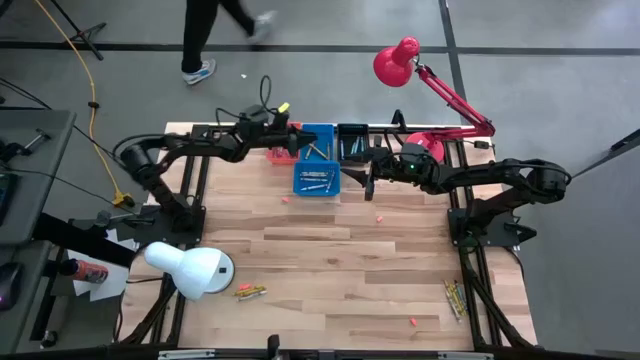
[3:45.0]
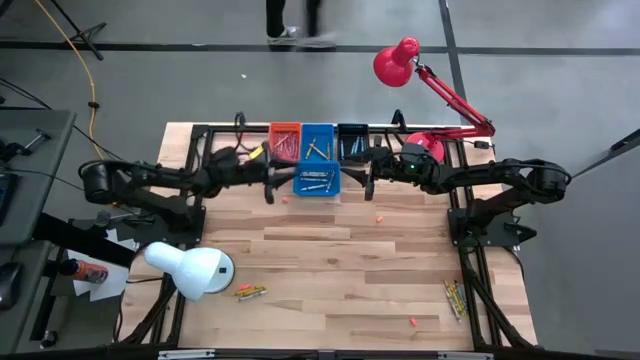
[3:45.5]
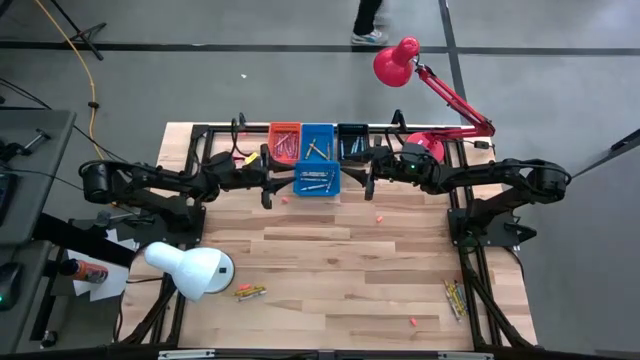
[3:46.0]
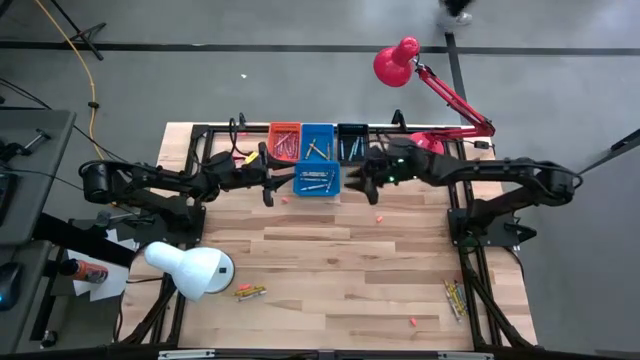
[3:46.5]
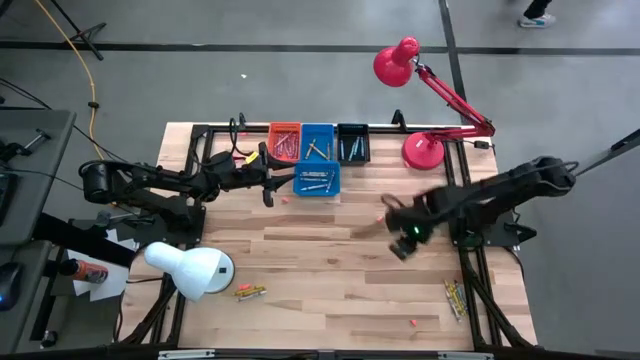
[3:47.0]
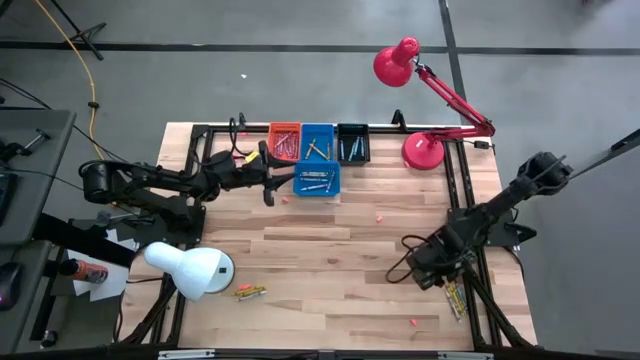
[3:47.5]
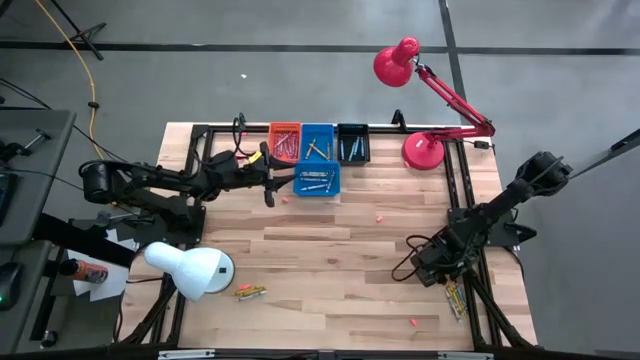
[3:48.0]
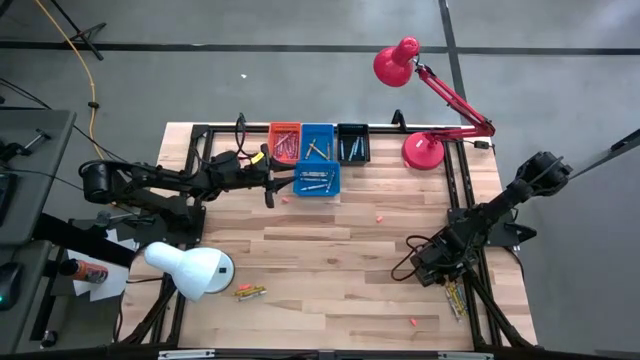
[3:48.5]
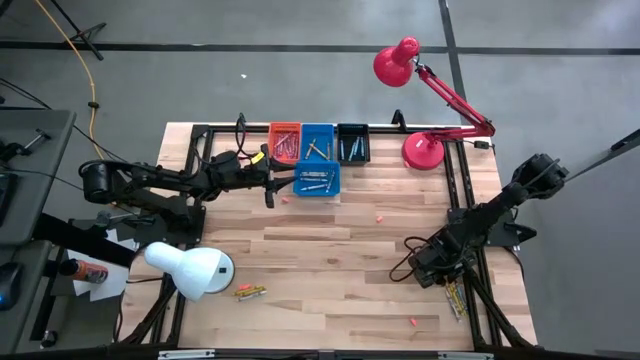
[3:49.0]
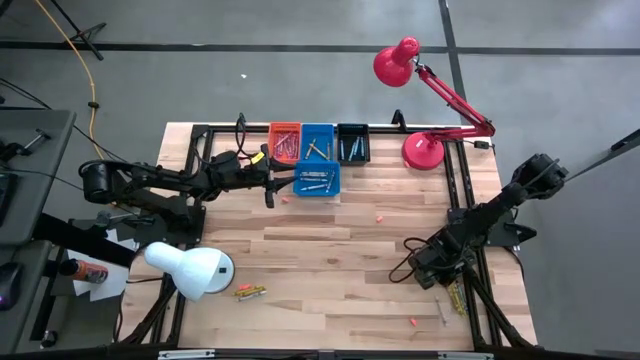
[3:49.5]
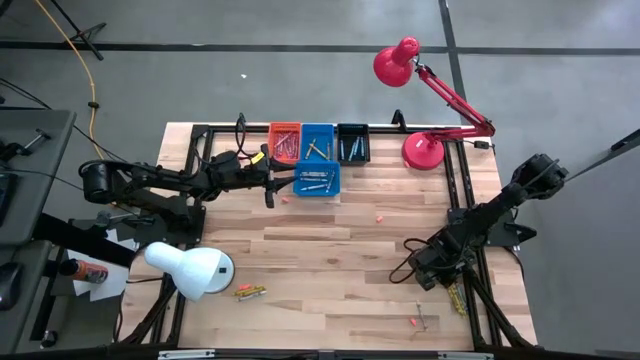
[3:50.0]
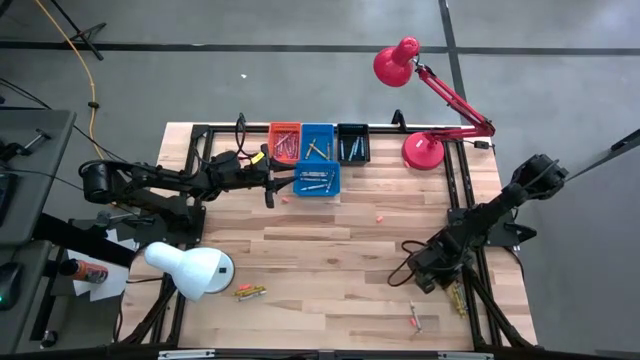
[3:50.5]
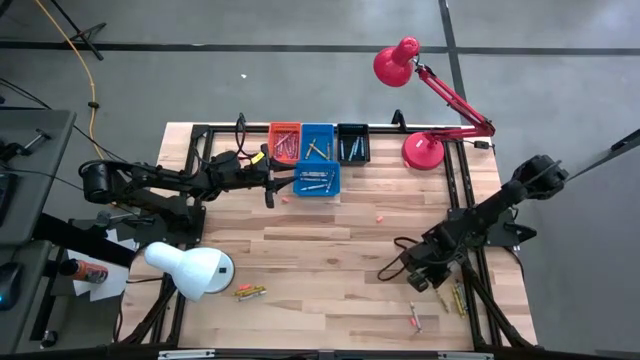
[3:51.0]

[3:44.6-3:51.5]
Task: Sort crayons
Put the yellow crayon into the top blue bin

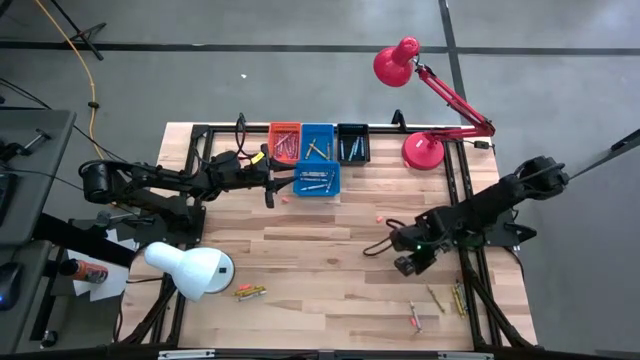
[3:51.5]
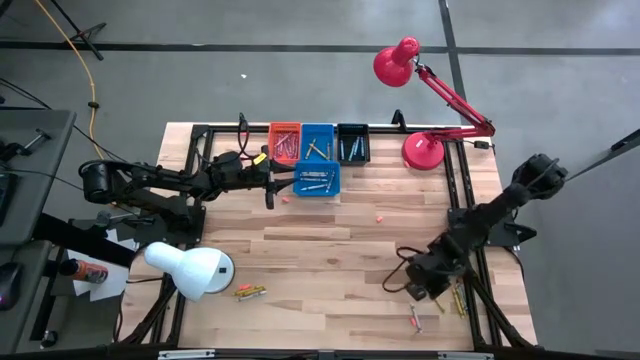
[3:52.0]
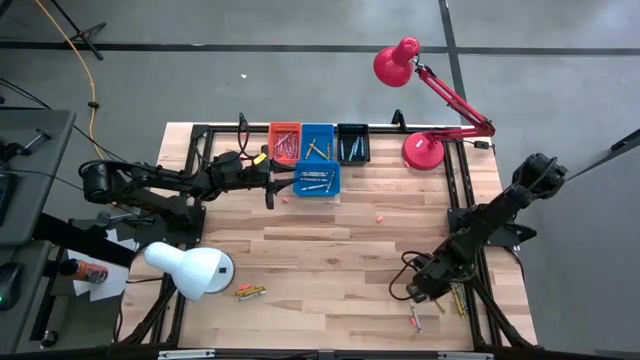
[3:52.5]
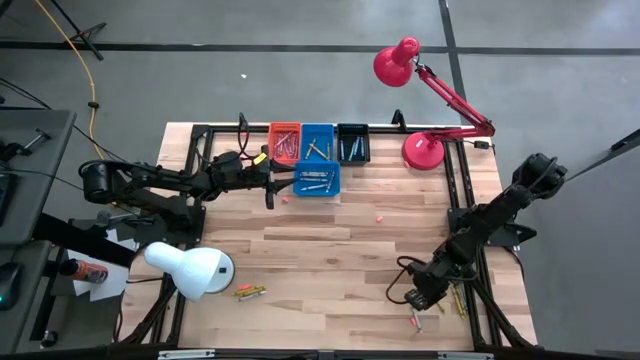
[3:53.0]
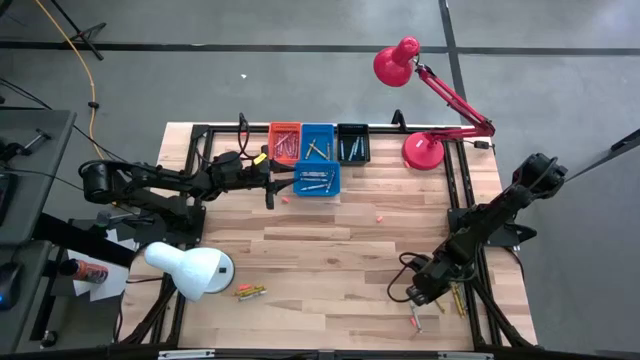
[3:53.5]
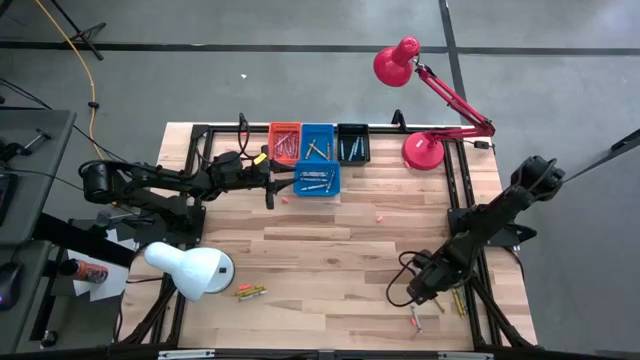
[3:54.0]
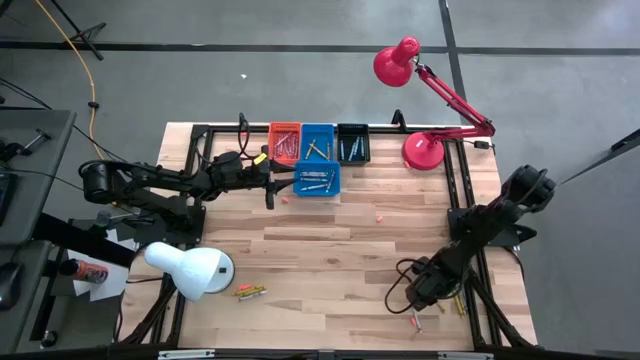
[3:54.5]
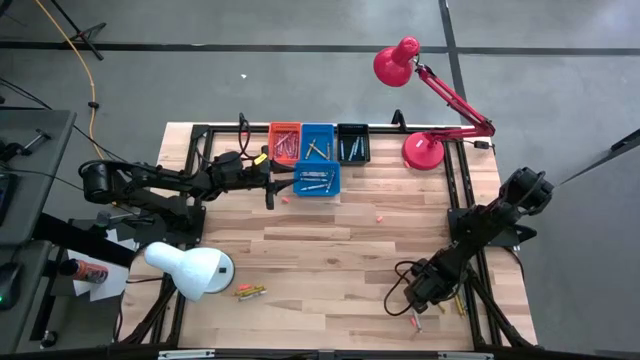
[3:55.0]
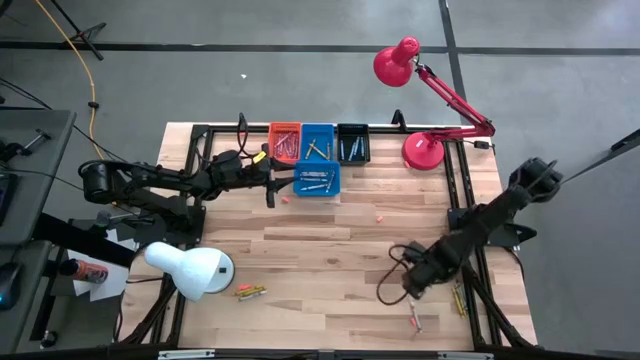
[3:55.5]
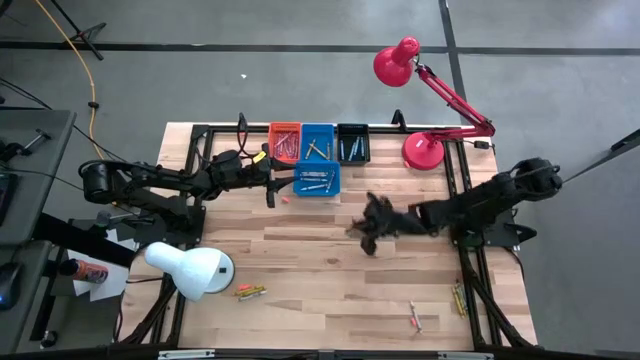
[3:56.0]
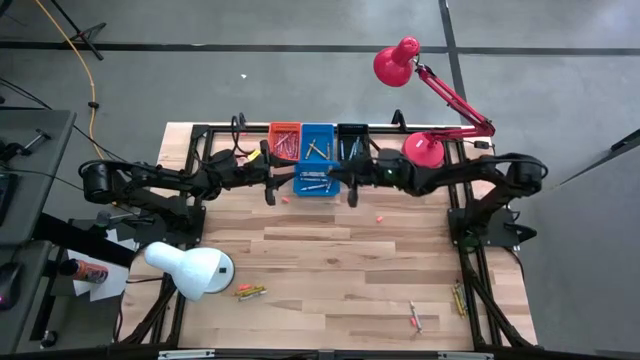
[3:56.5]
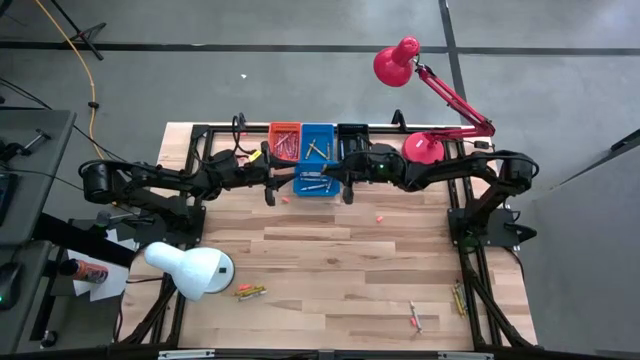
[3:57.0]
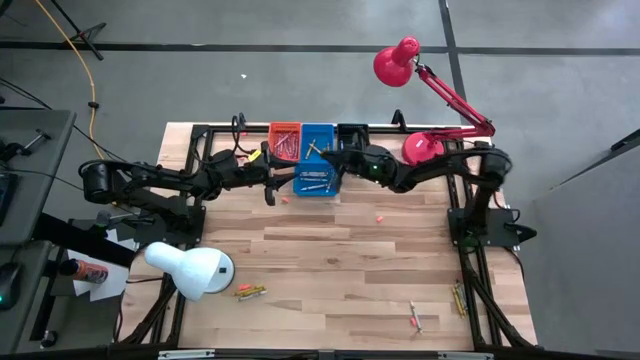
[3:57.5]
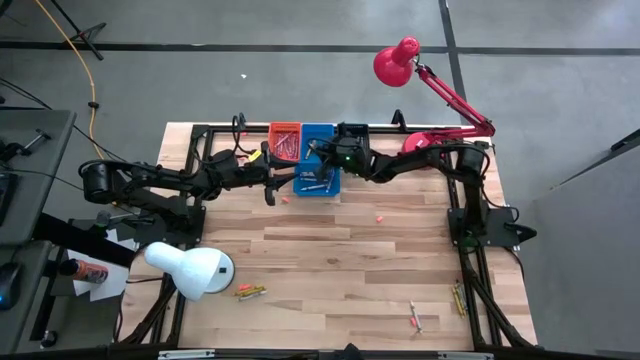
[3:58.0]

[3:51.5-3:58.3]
Put the yellow crayon into the top blue bin

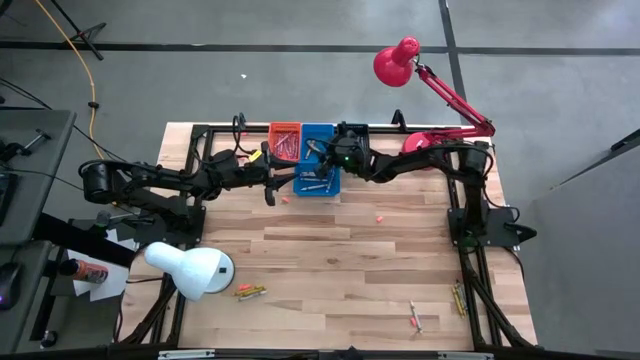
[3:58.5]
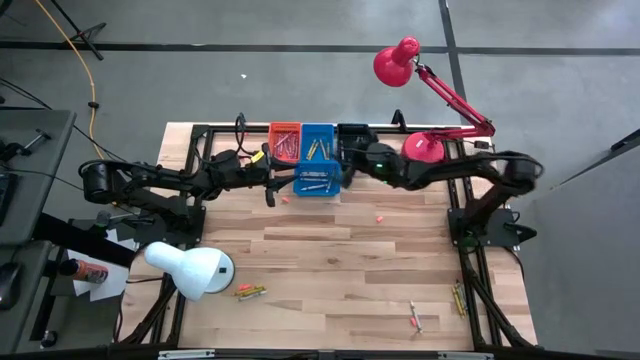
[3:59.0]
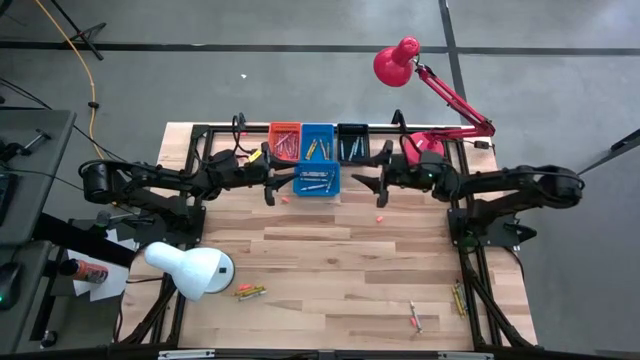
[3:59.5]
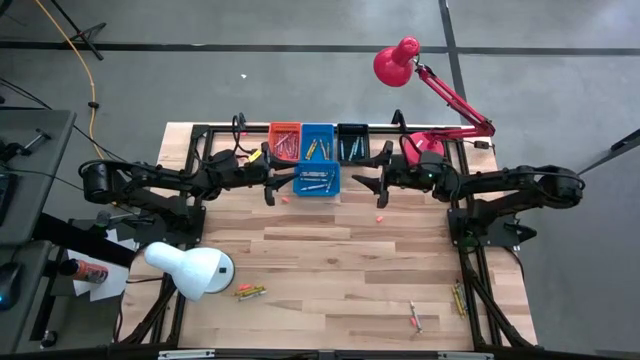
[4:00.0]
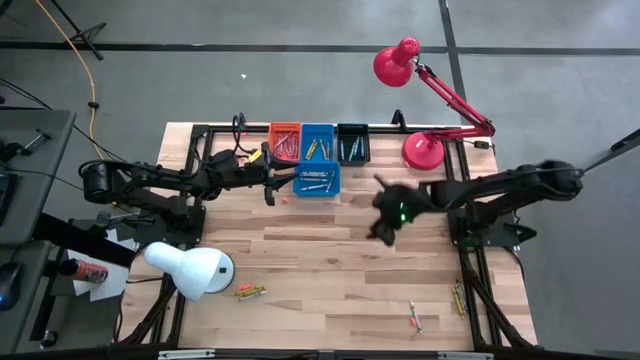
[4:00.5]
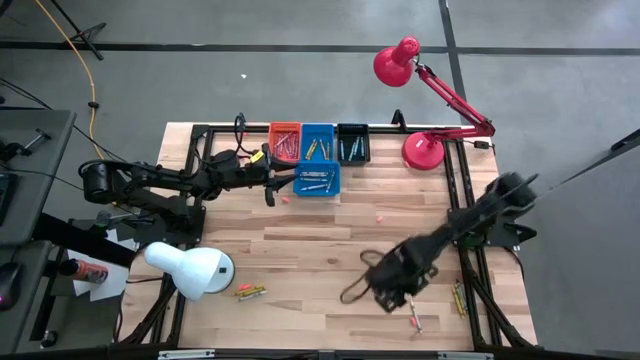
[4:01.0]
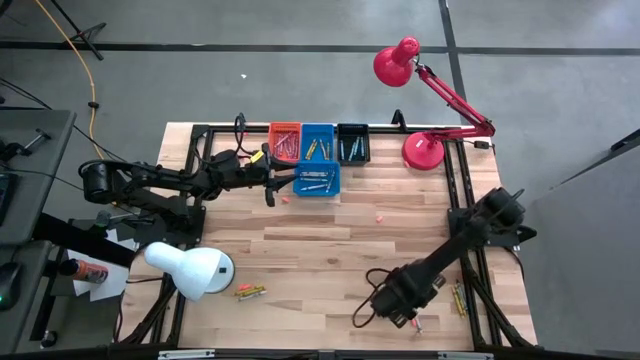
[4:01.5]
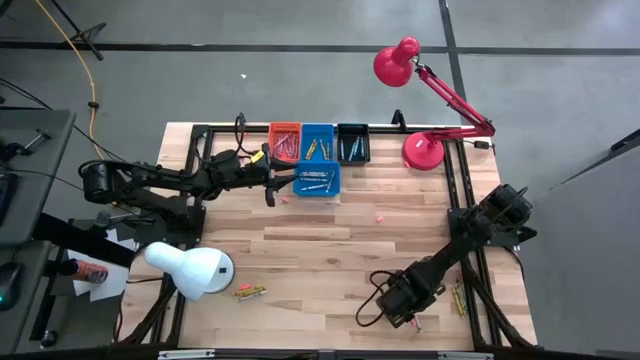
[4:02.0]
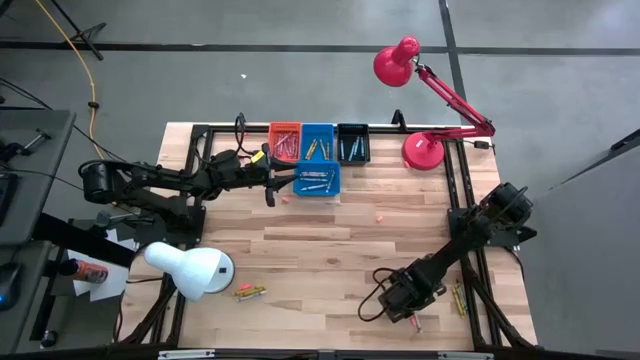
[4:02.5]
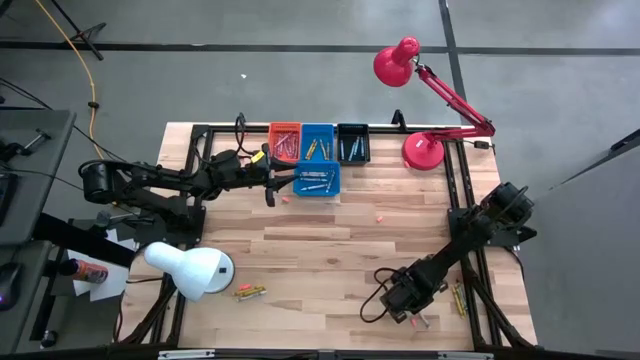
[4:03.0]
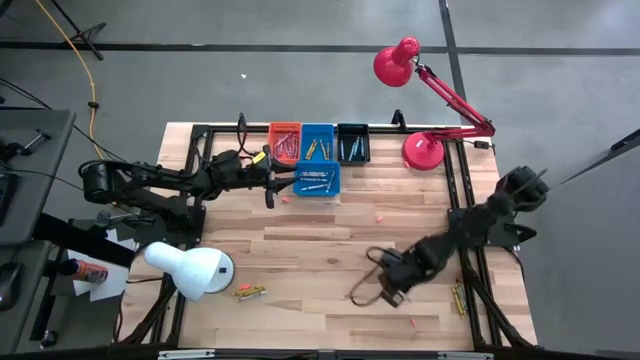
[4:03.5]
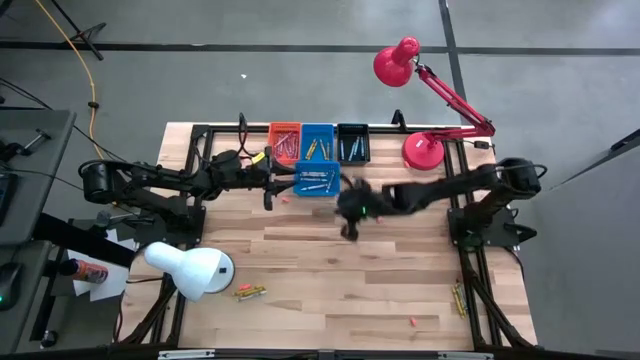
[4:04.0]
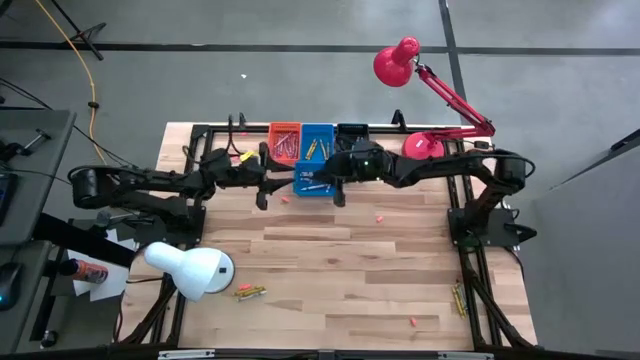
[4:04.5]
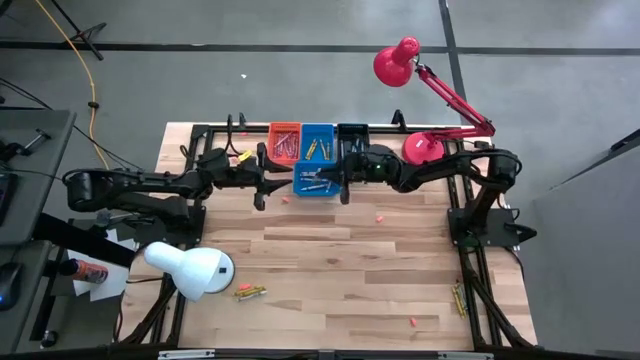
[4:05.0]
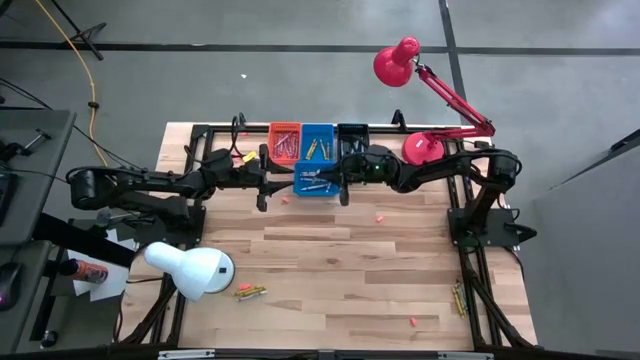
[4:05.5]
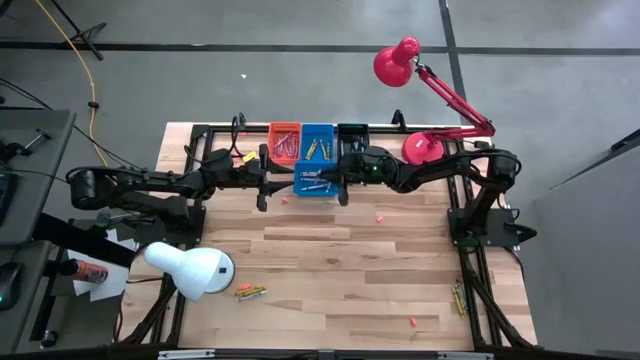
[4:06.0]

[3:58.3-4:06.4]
Put the white crayon into the bottom blue bin
